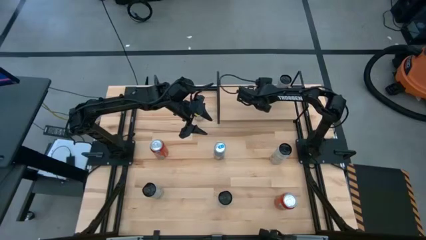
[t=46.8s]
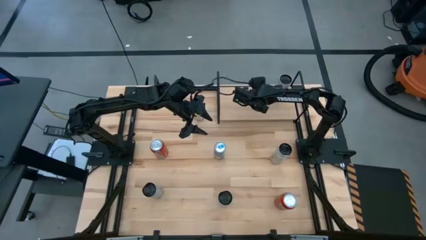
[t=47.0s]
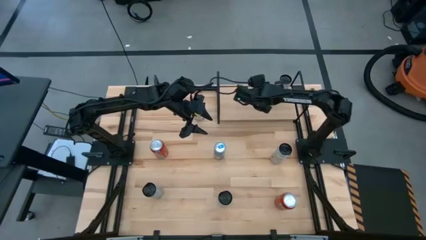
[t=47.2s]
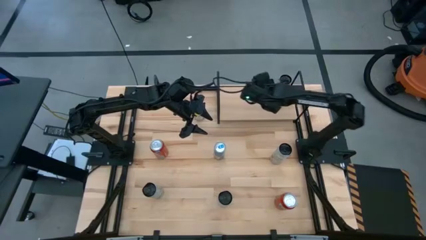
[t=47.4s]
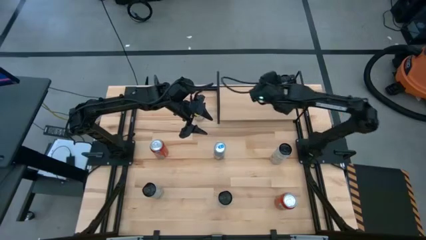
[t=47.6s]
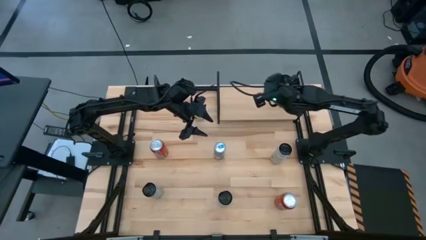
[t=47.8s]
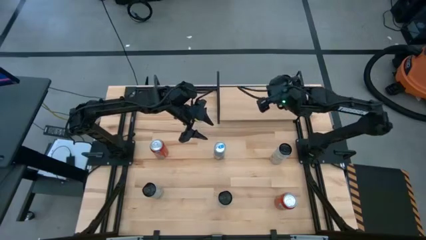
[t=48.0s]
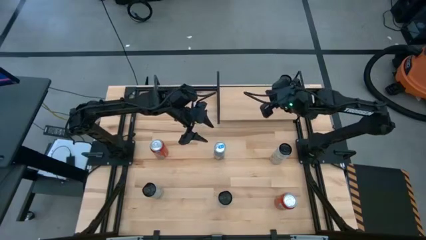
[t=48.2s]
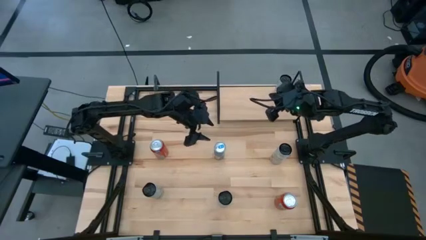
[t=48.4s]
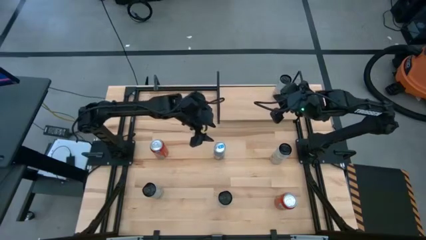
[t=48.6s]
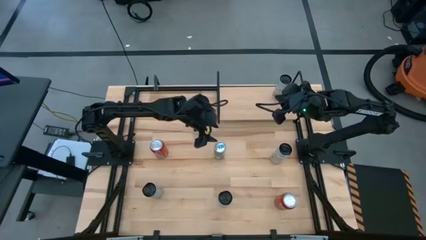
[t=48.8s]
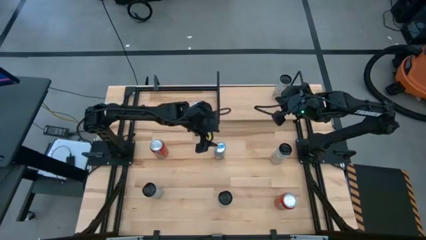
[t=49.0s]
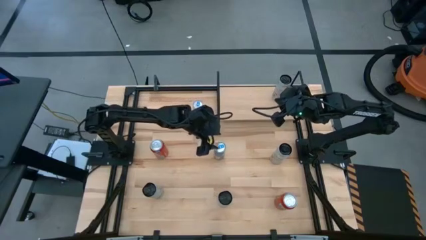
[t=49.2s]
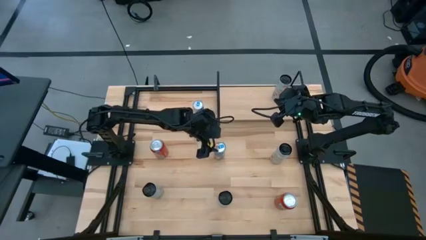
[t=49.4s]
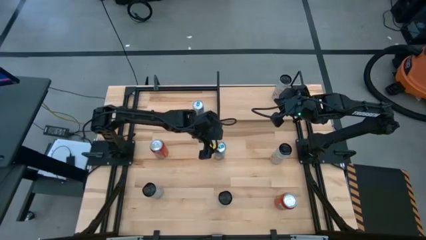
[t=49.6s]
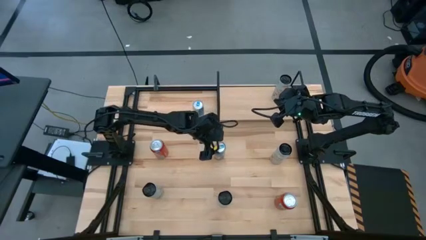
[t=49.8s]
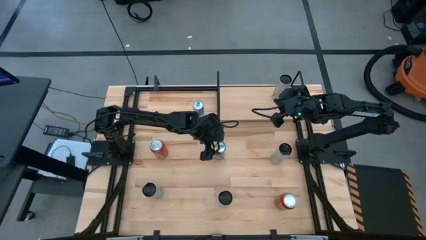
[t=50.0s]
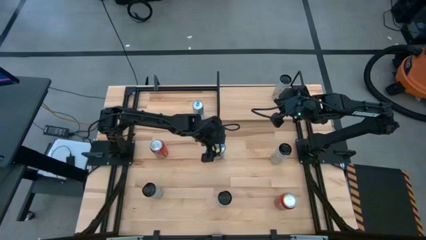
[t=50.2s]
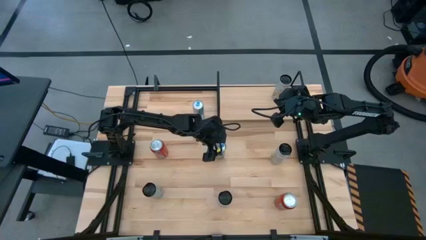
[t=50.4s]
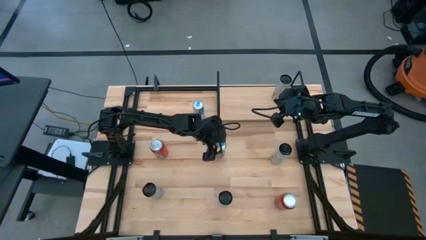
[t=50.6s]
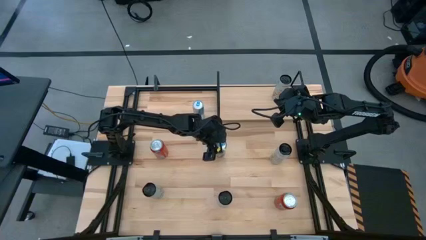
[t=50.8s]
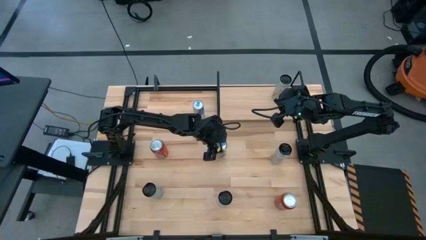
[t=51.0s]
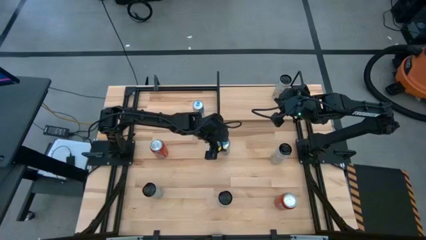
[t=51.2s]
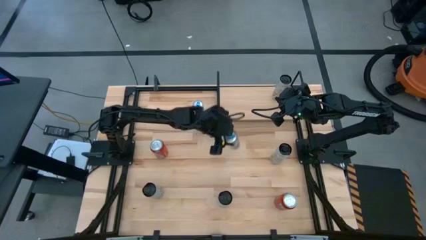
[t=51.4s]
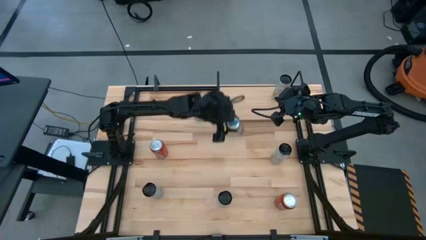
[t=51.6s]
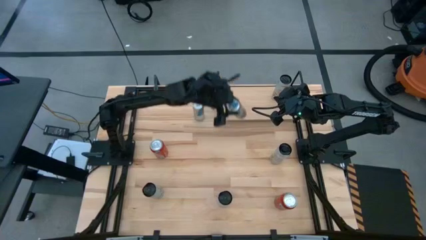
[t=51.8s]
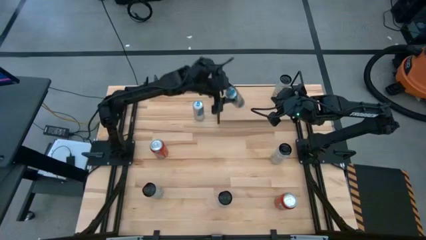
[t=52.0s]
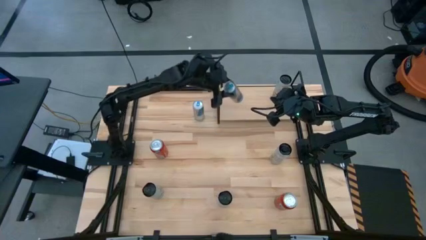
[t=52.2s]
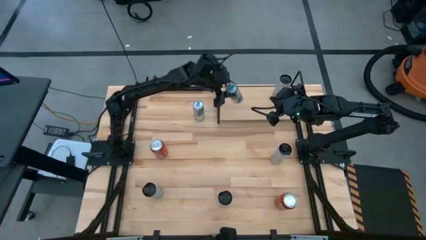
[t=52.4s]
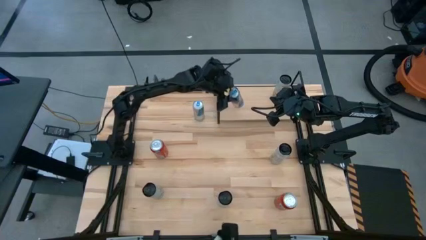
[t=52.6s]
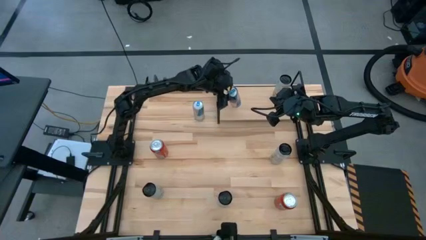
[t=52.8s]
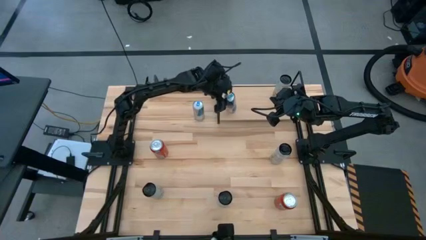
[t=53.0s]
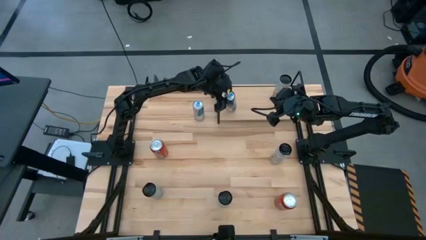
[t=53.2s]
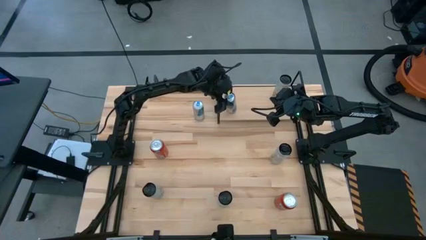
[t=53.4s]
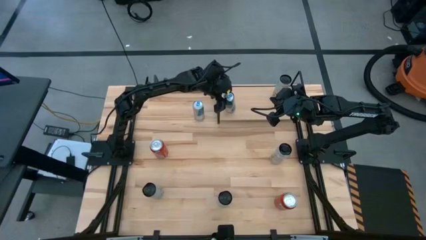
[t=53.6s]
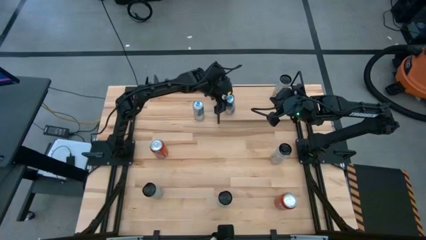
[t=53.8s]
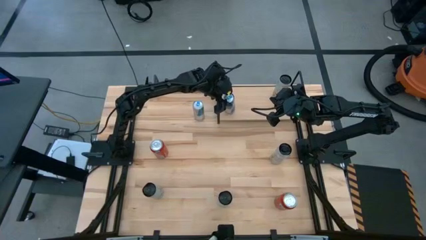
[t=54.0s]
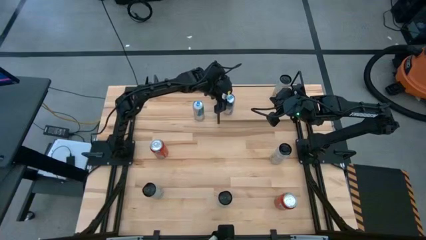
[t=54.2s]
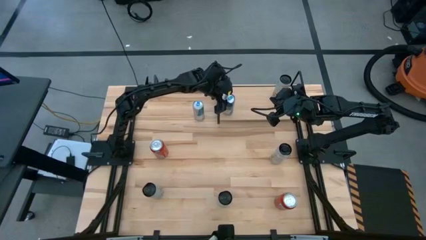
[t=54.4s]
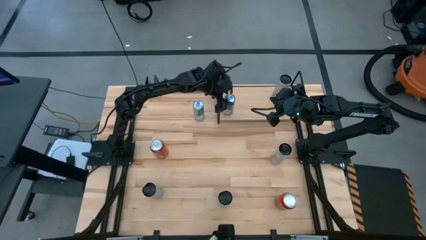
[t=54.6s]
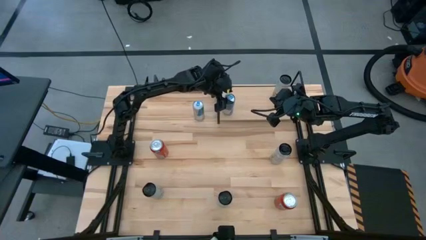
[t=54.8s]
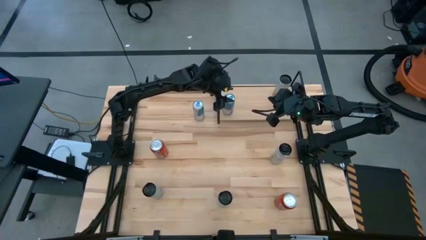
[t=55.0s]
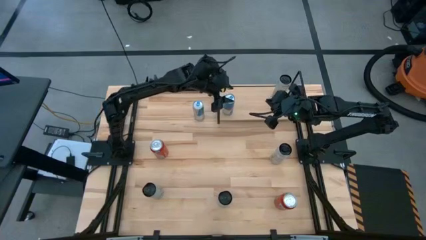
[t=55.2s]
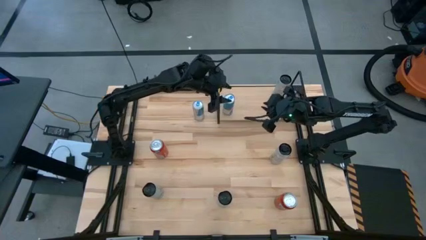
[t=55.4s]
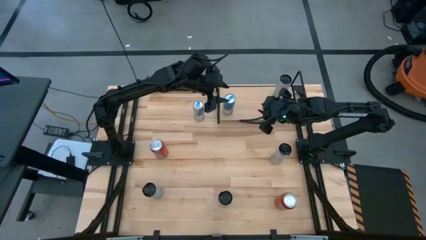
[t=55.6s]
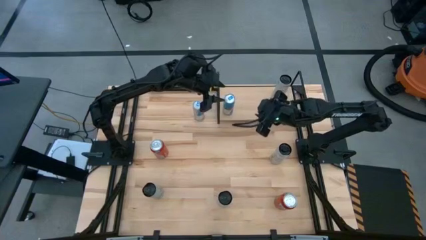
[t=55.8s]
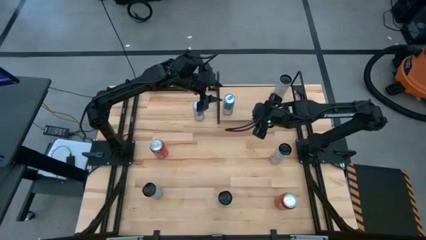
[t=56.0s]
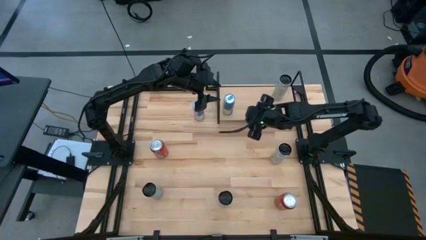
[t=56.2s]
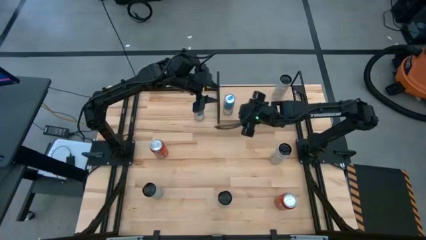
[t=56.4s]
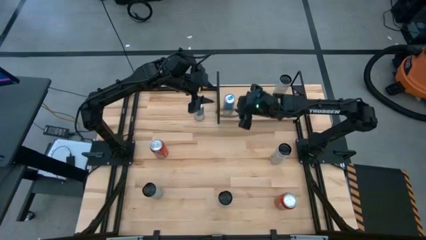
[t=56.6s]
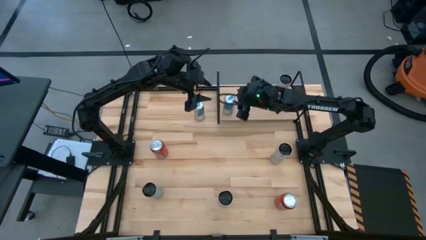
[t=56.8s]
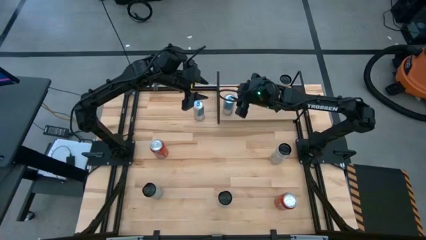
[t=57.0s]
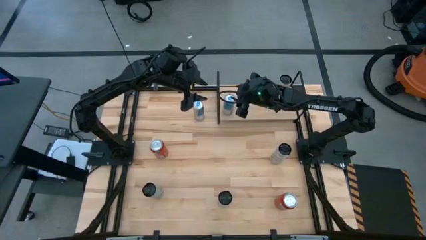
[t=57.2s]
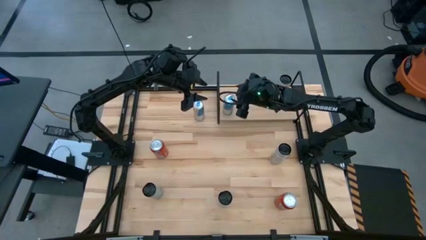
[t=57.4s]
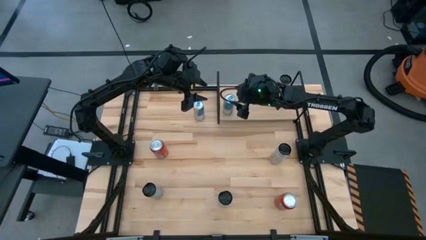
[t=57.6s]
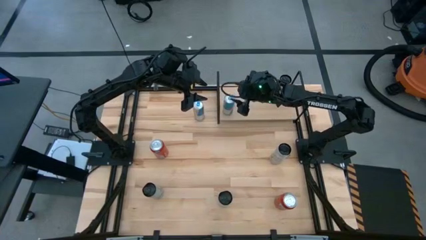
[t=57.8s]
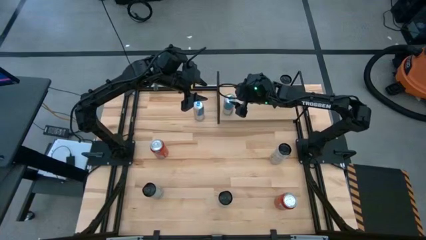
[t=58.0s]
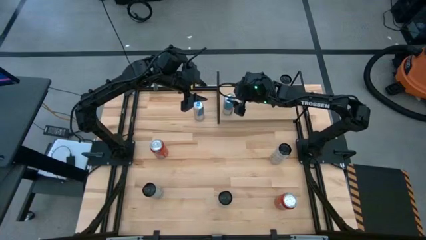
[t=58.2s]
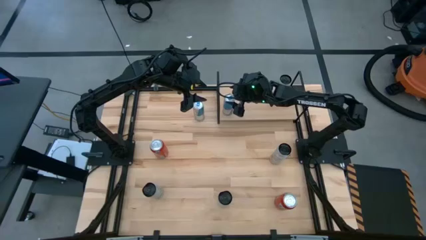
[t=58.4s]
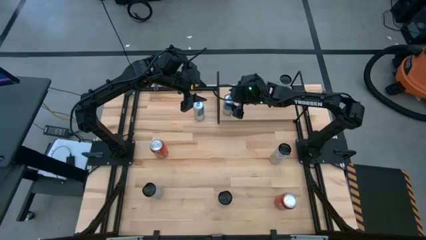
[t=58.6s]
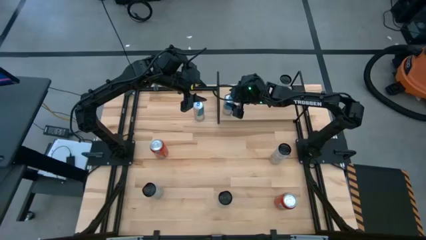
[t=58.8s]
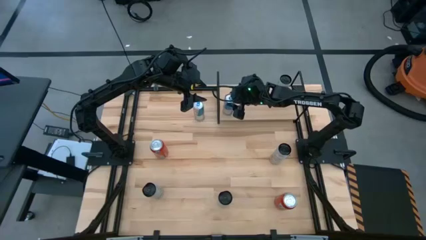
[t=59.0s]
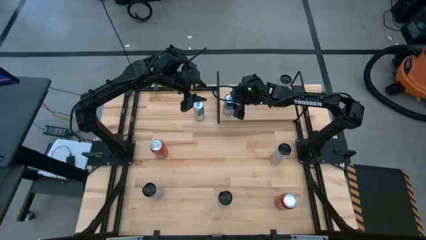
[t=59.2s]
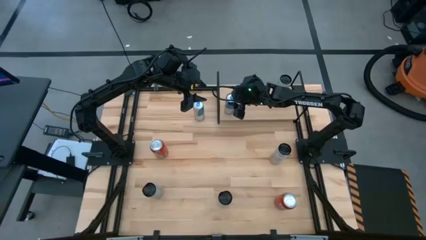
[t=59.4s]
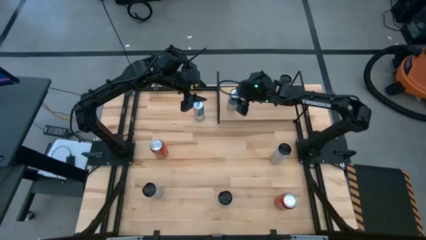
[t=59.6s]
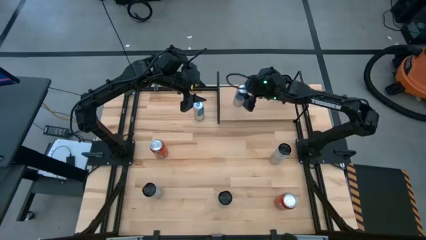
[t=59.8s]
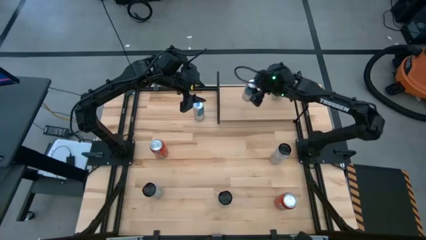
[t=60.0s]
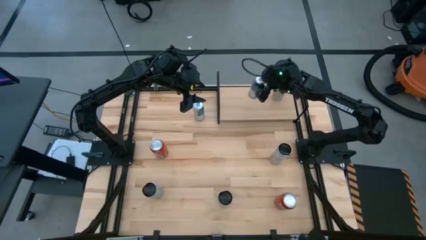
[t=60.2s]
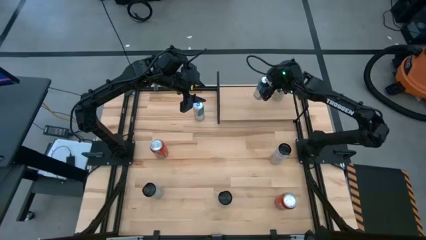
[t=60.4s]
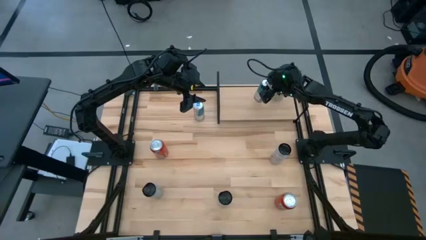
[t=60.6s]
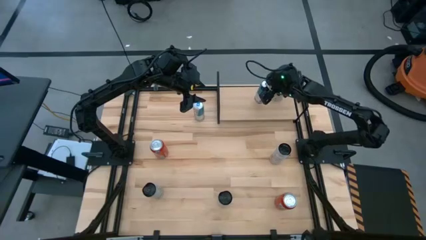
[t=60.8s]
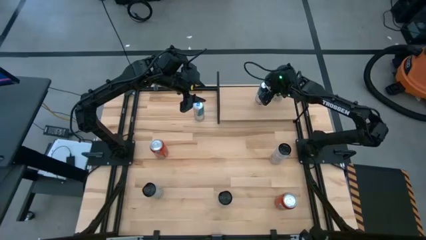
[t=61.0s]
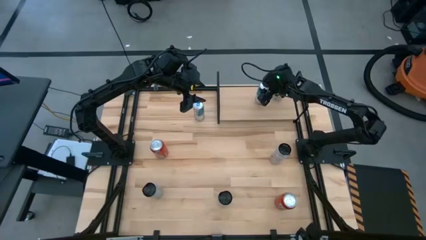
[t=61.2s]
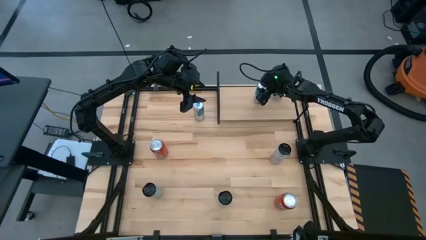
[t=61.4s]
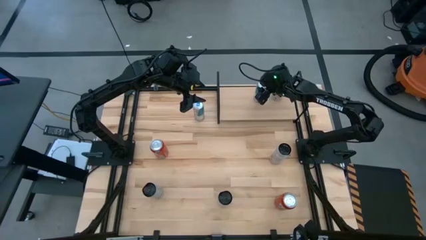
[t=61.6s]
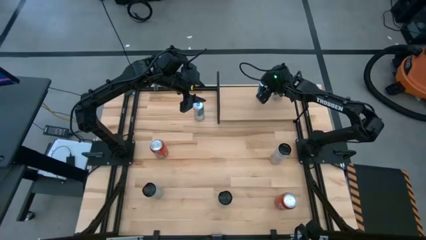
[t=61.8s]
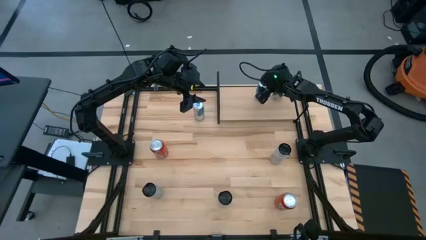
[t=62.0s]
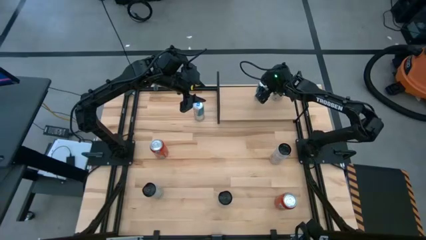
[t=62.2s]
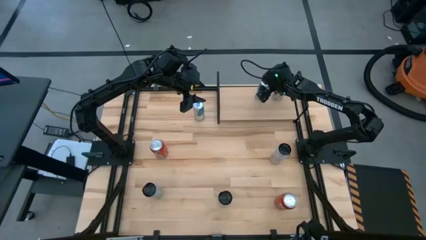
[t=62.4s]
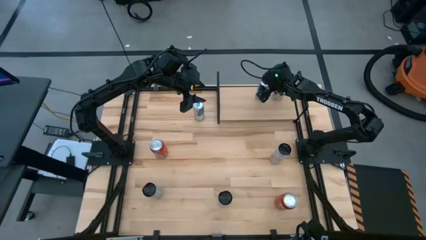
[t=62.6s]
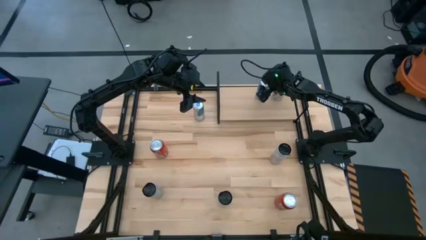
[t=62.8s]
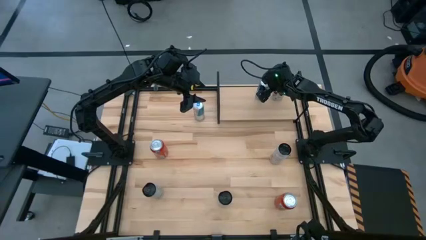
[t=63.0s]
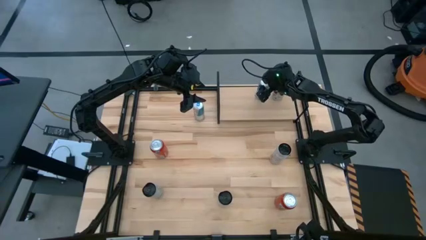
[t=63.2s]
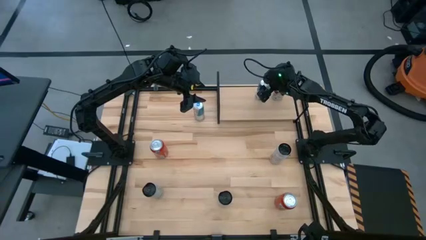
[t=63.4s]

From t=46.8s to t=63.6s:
Task: Place canned beverage on shelf
Put the bottom blue soda can on the shelf
